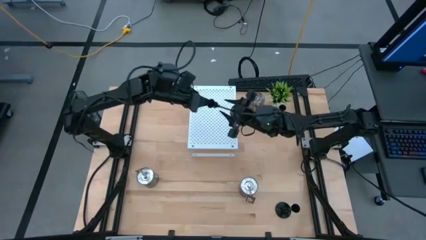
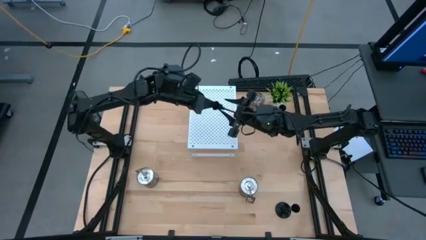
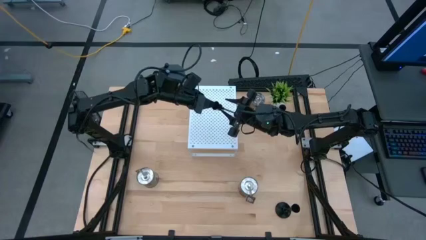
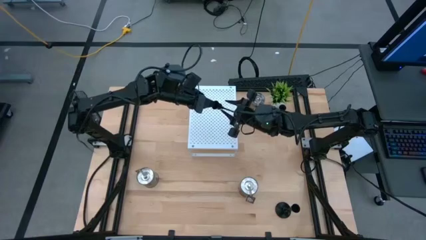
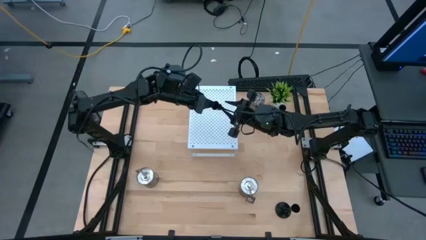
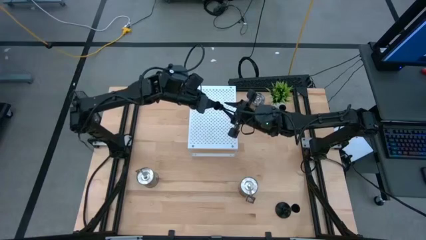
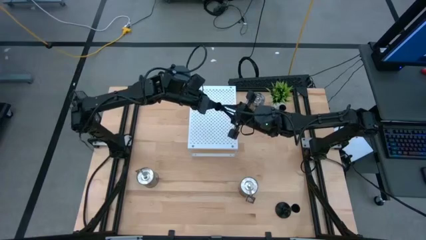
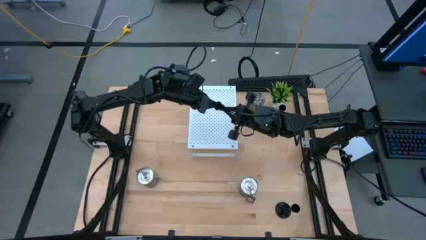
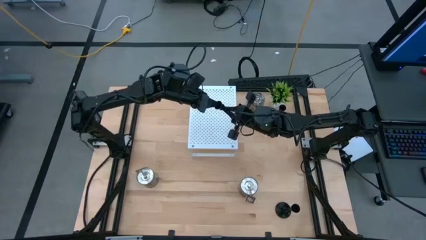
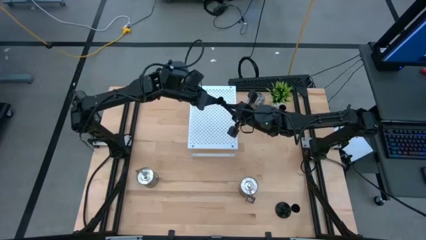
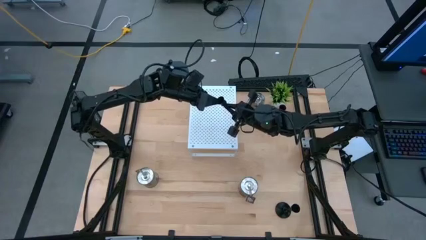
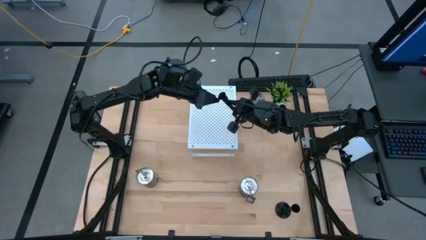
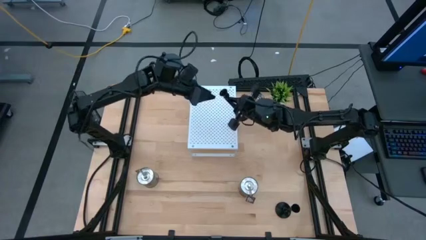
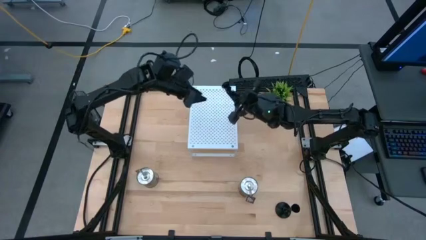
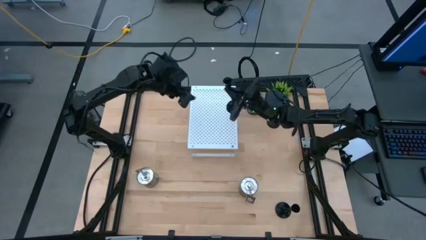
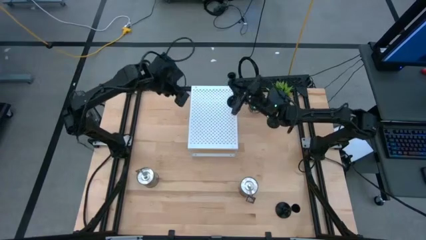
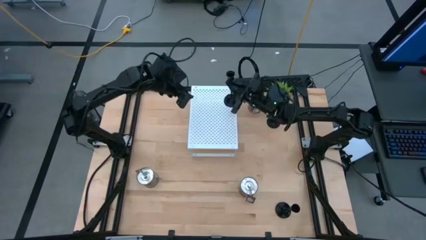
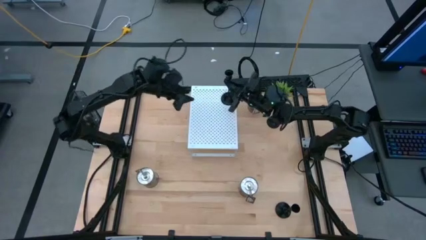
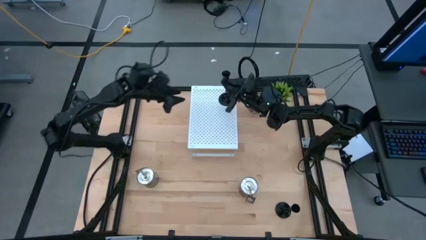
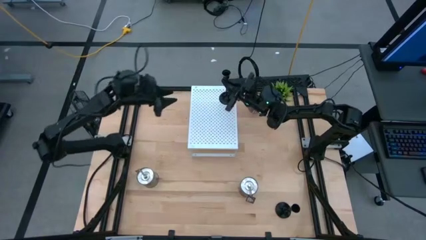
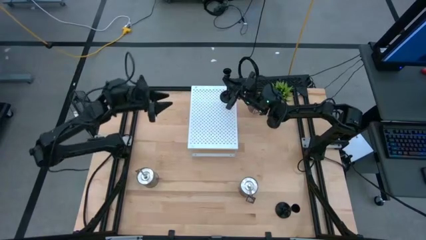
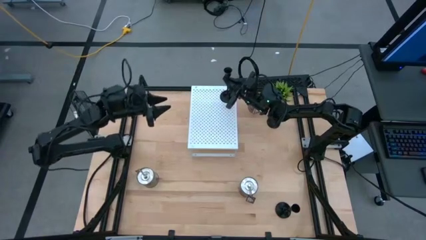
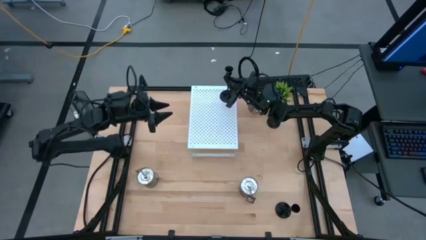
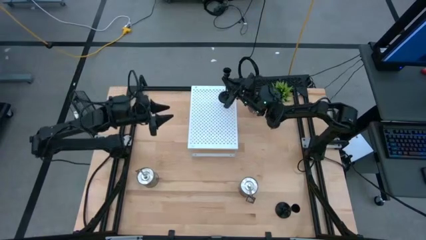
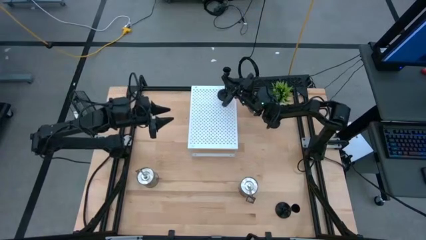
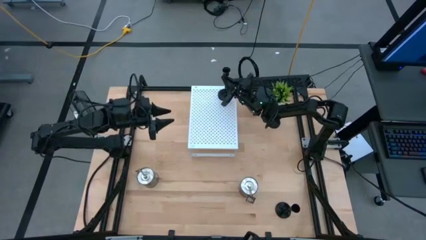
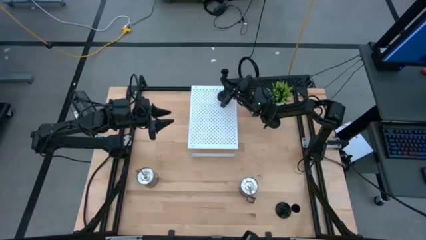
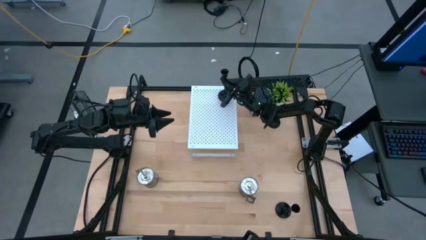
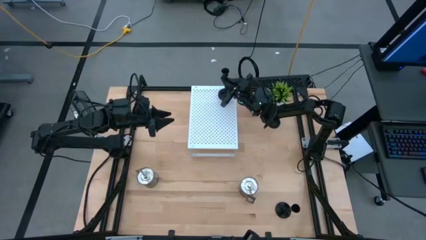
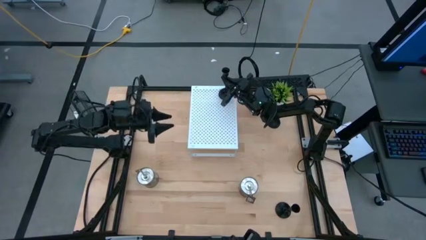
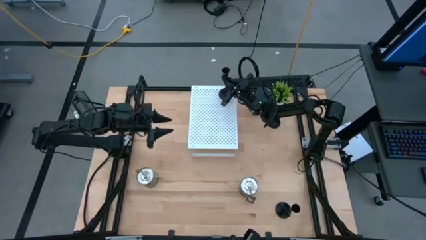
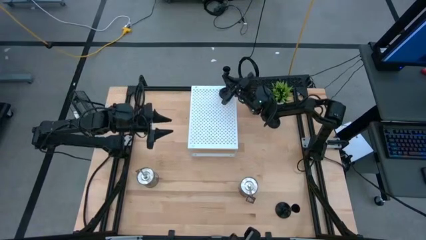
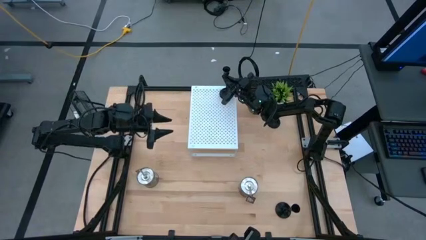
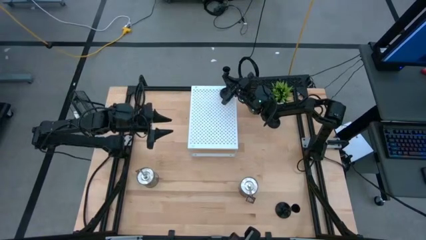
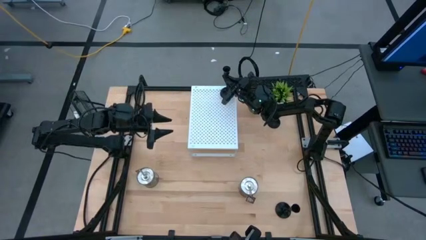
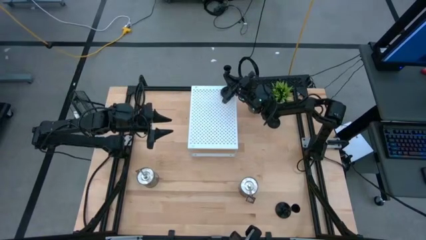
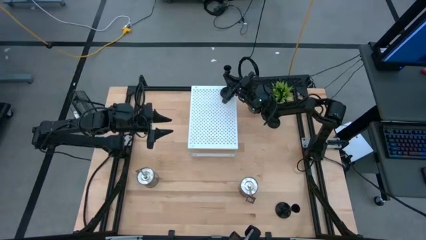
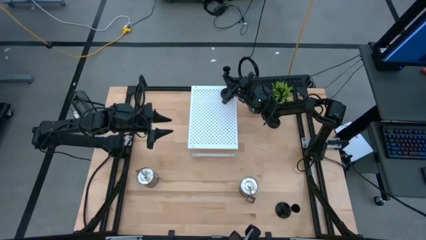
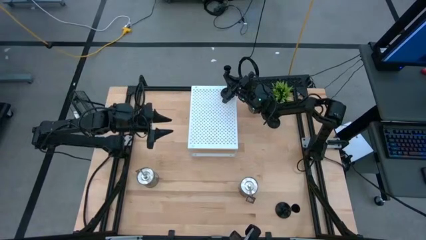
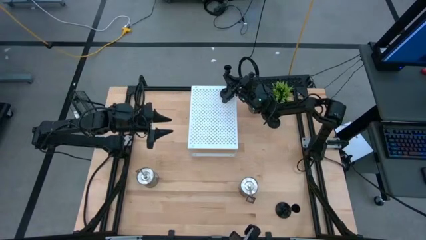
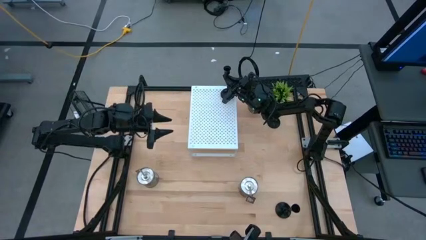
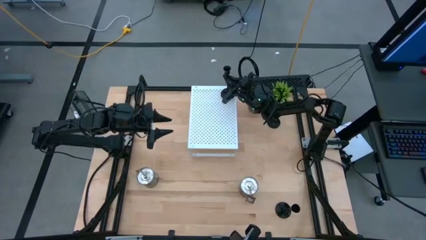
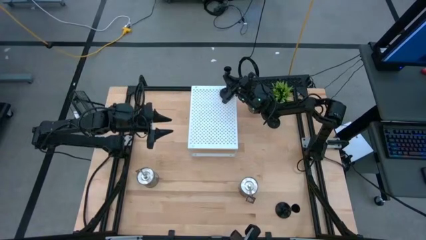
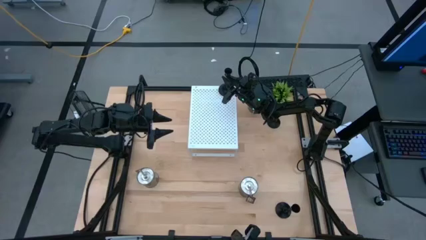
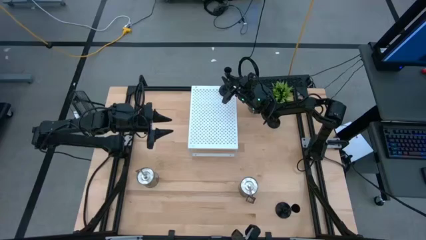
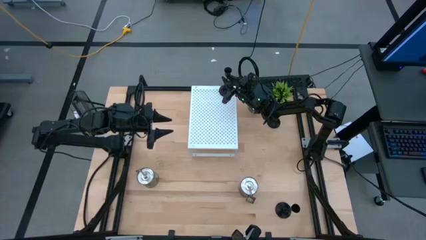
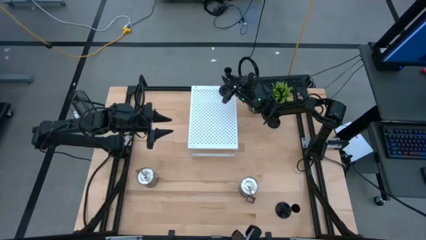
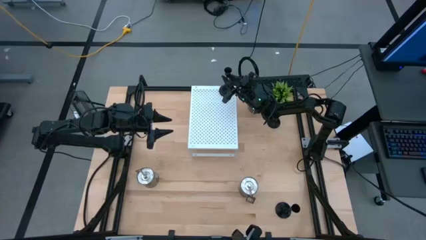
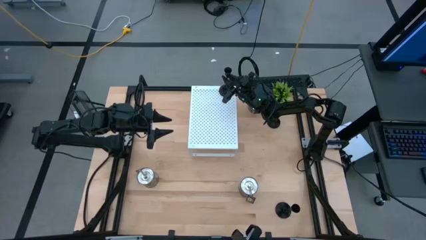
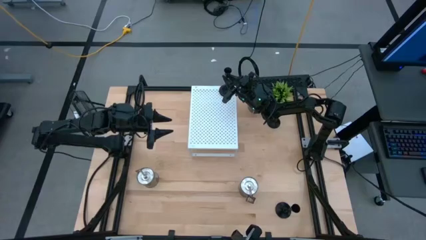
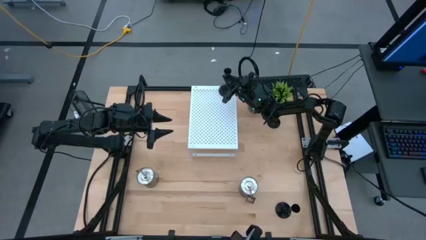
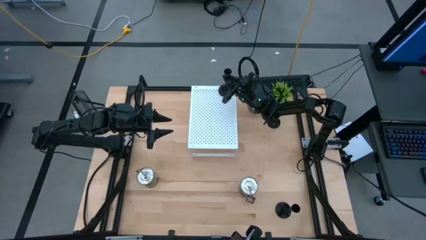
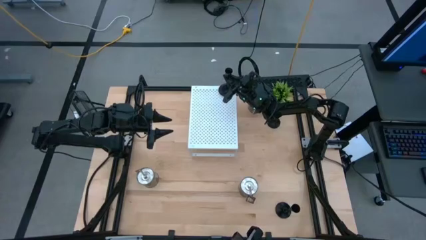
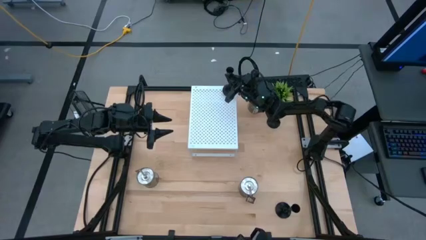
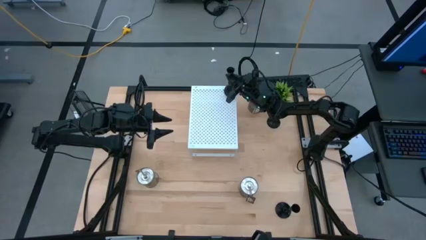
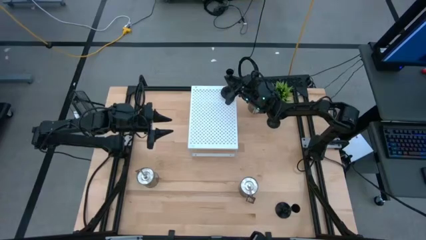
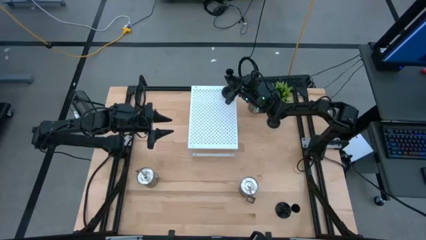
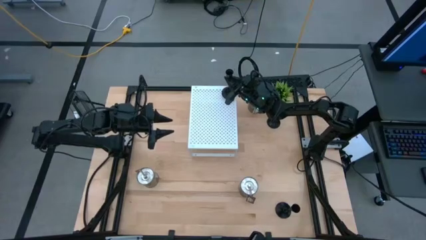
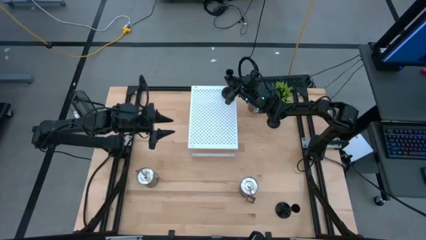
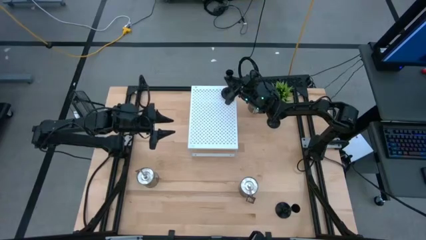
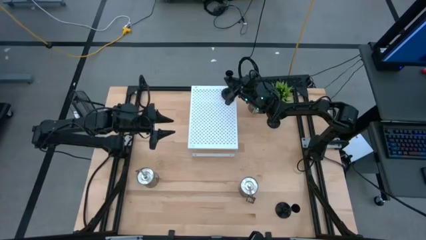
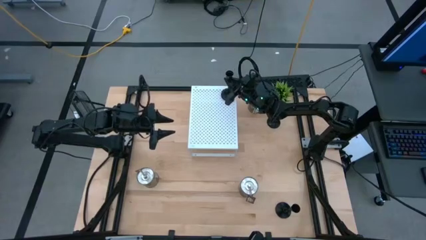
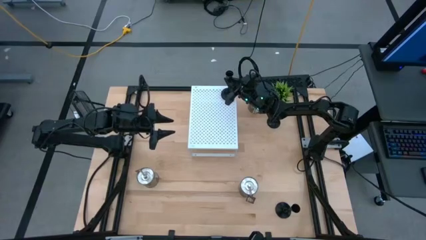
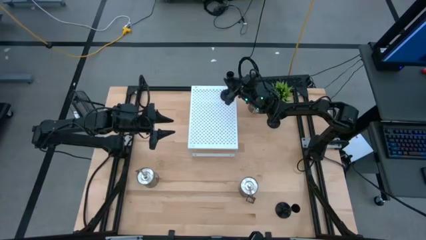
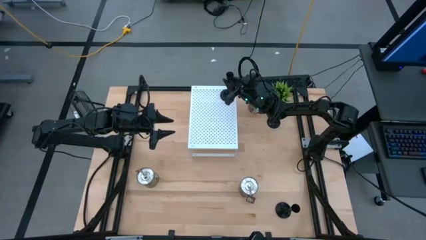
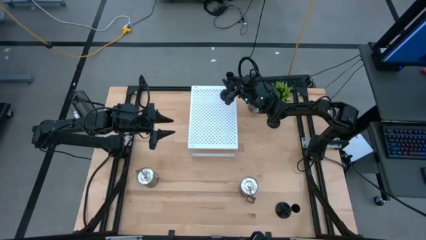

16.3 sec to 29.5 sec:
Task: Pick & Place candle stick holders
Put the top left black candle holder on the shelf

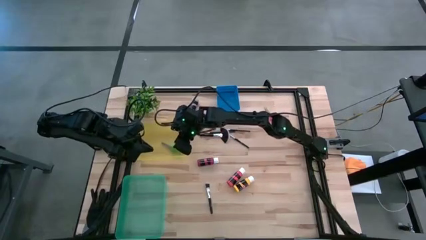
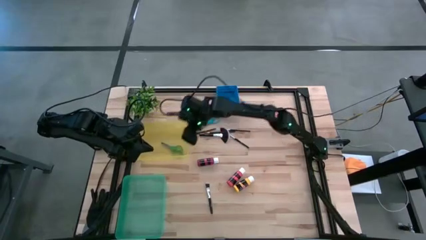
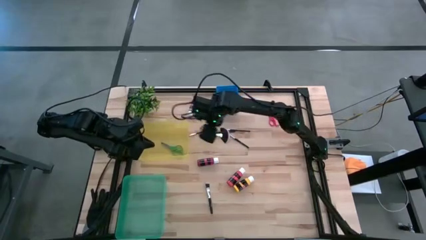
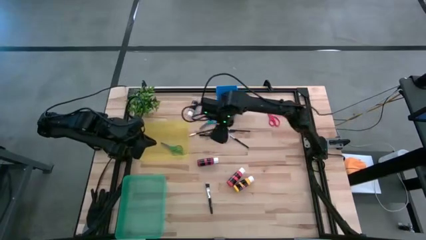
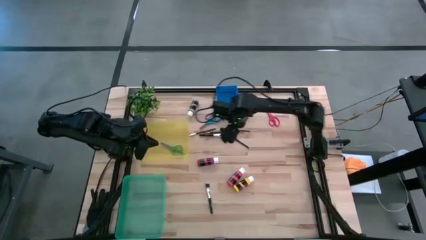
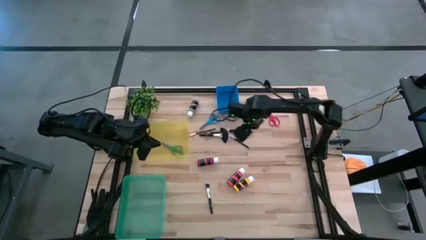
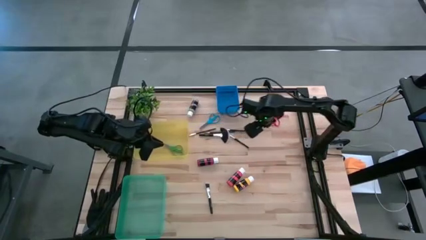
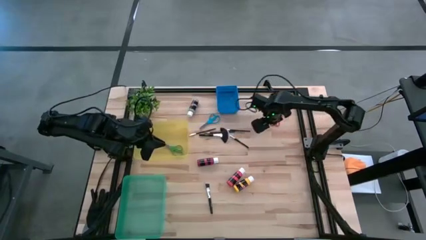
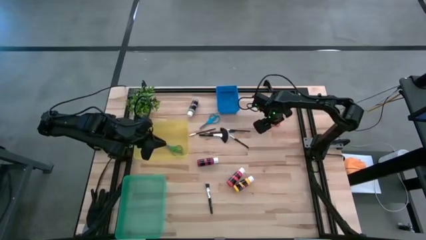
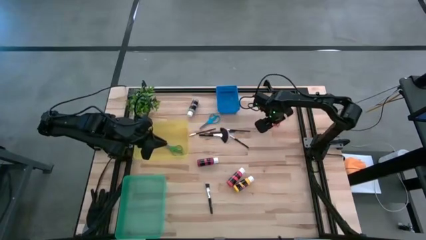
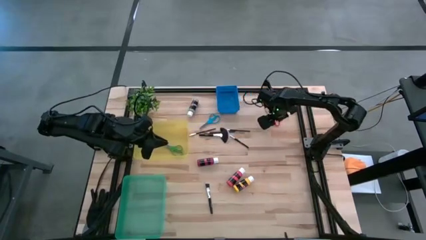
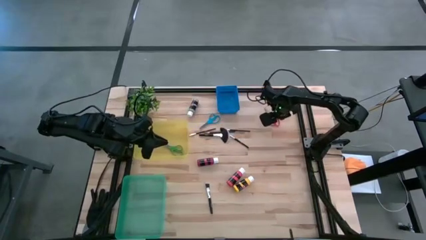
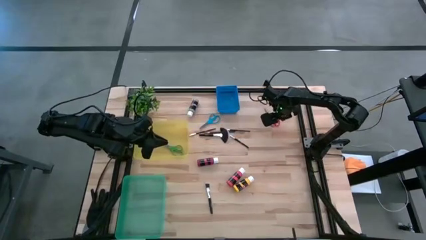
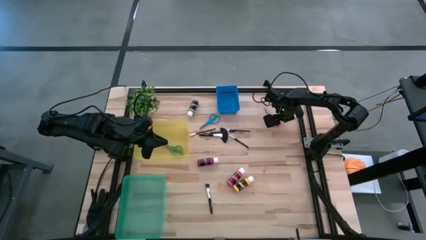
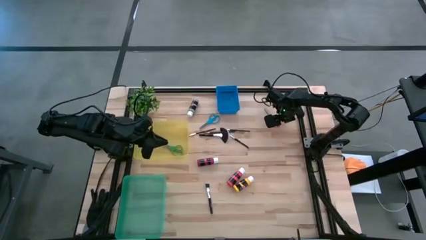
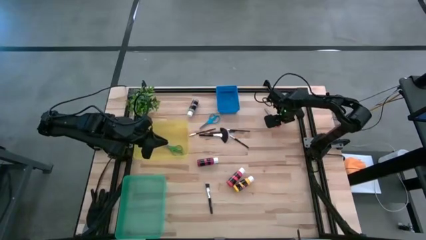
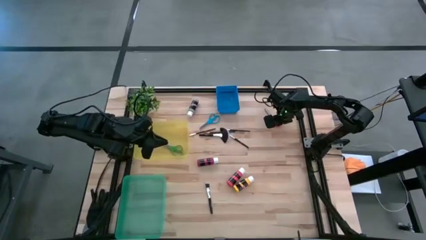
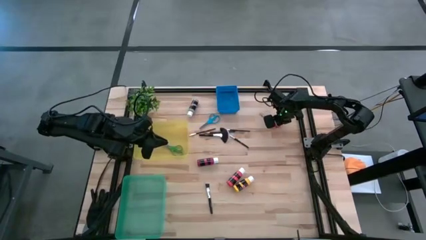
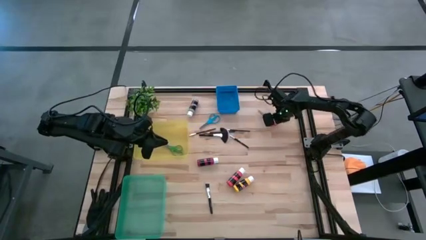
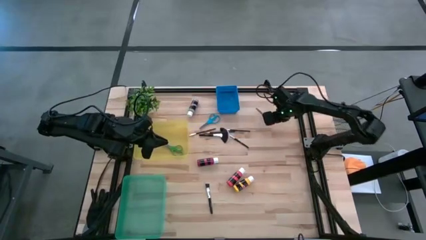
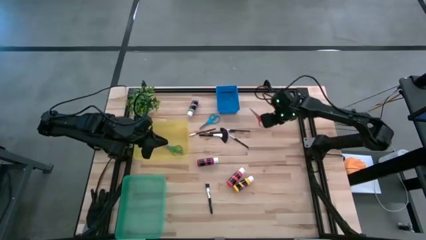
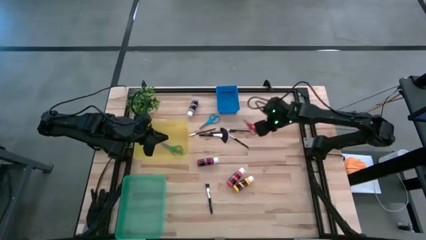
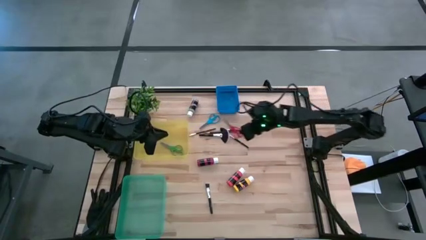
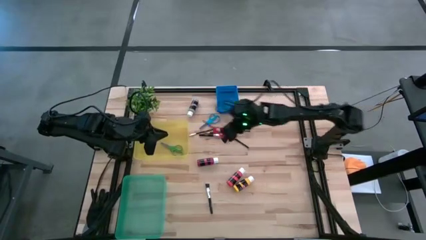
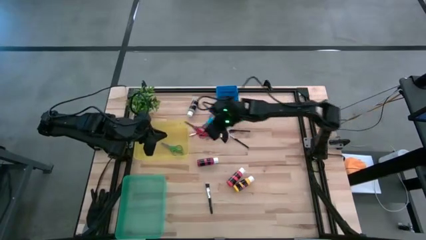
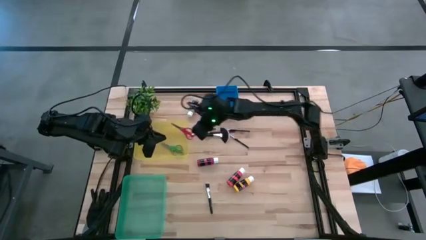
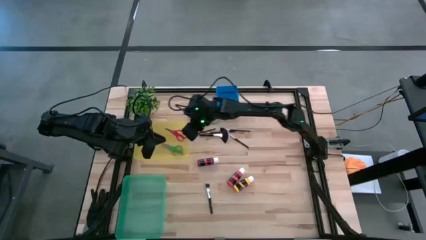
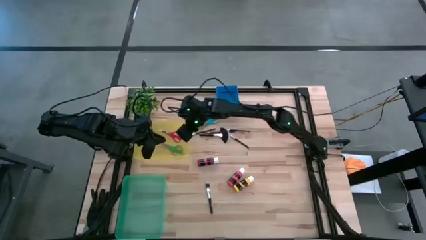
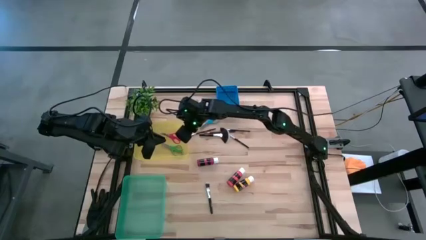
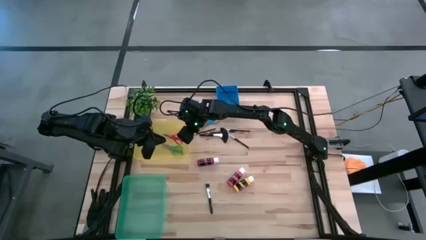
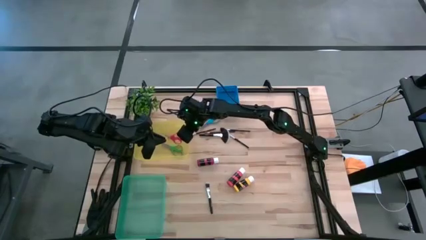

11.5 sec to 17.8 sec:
Task: Pick & Place Paint Supplies
Put the red scissors into the yellow bin
